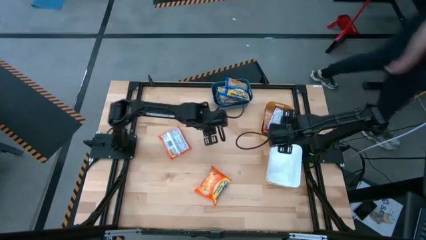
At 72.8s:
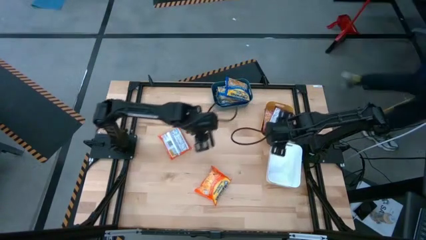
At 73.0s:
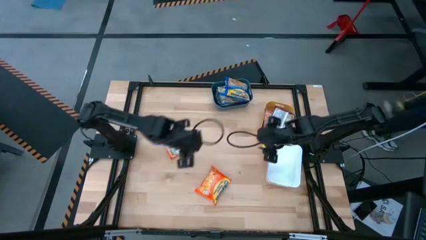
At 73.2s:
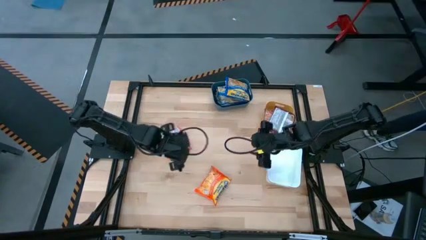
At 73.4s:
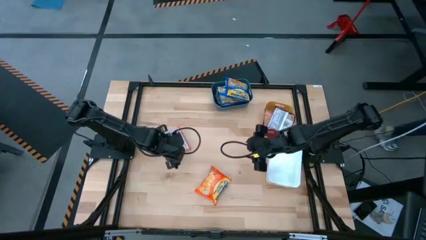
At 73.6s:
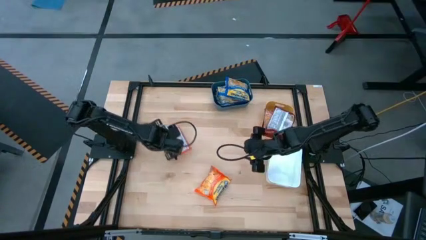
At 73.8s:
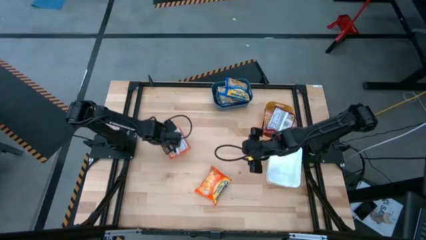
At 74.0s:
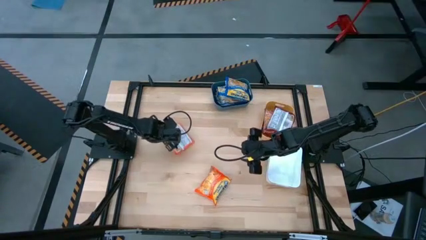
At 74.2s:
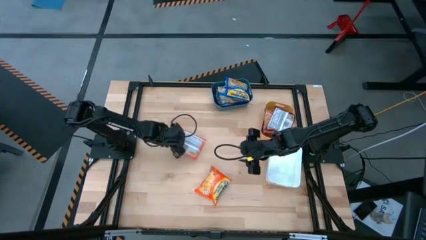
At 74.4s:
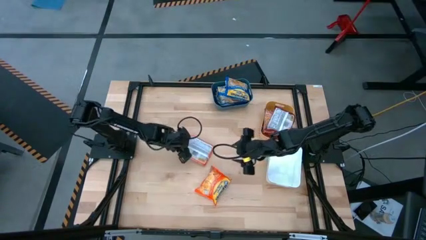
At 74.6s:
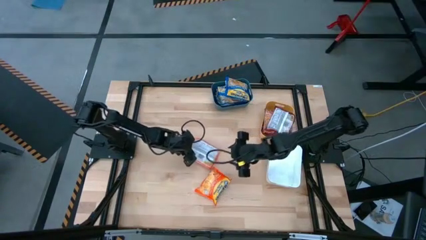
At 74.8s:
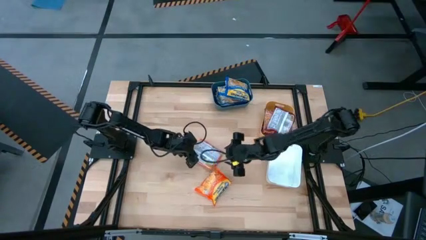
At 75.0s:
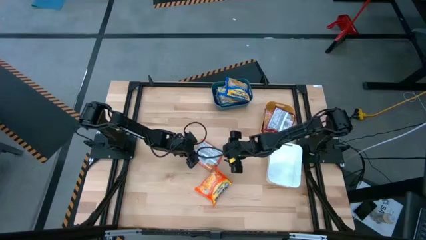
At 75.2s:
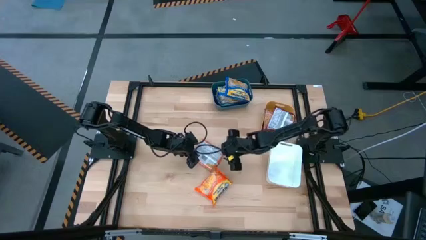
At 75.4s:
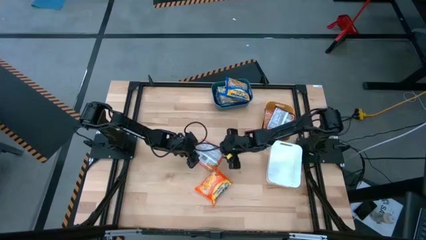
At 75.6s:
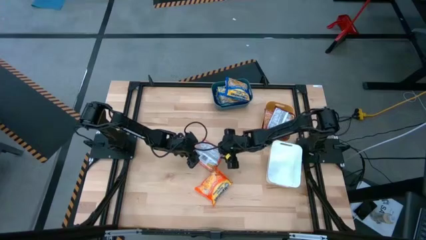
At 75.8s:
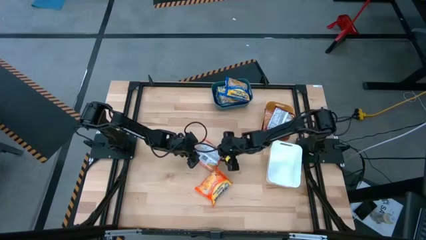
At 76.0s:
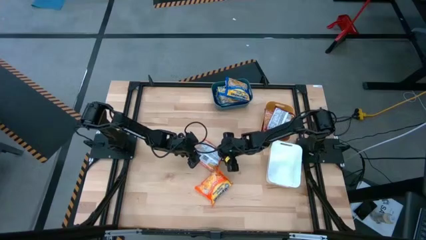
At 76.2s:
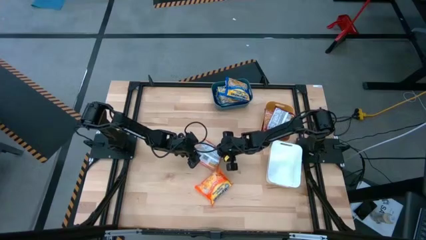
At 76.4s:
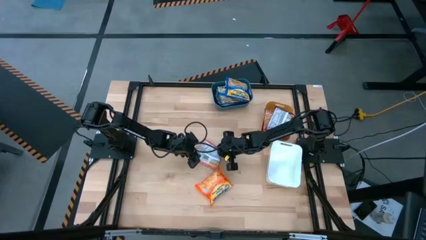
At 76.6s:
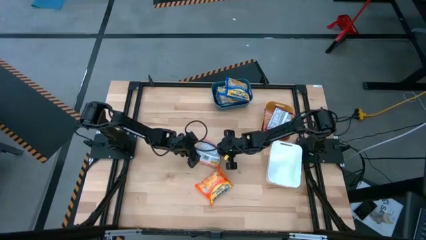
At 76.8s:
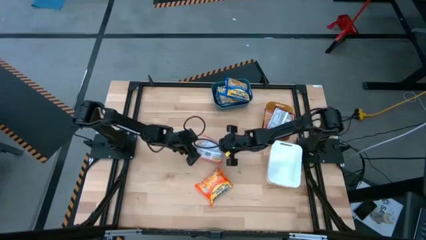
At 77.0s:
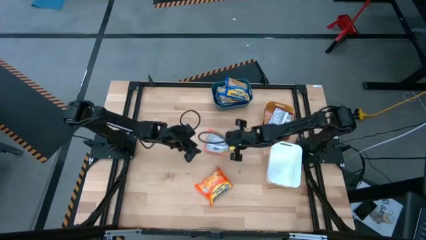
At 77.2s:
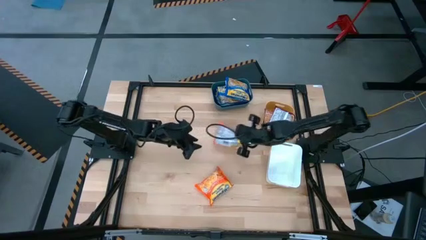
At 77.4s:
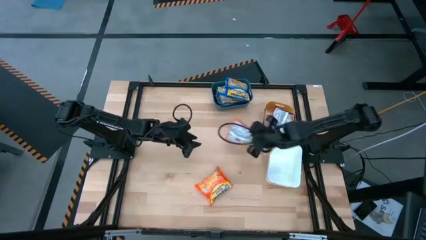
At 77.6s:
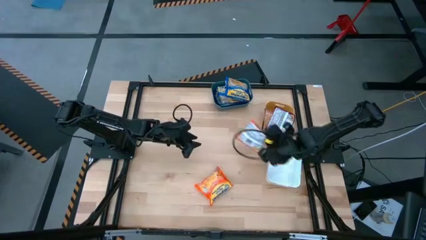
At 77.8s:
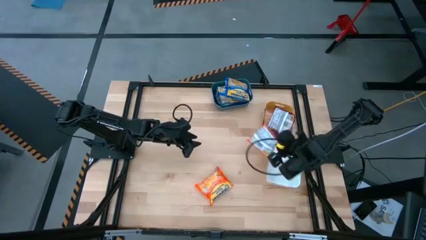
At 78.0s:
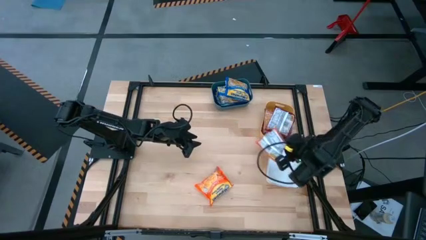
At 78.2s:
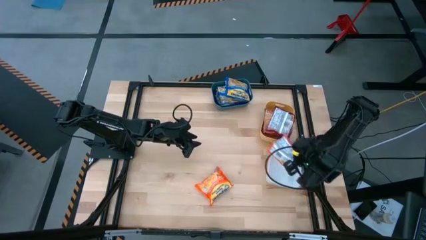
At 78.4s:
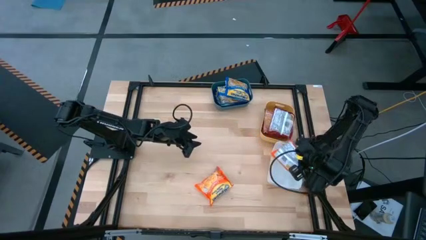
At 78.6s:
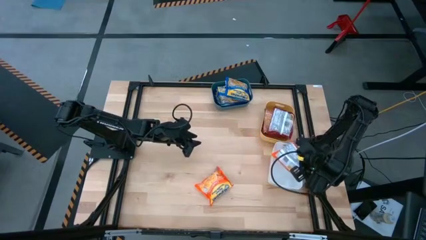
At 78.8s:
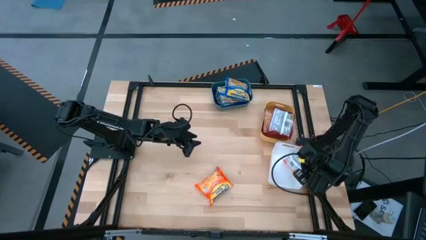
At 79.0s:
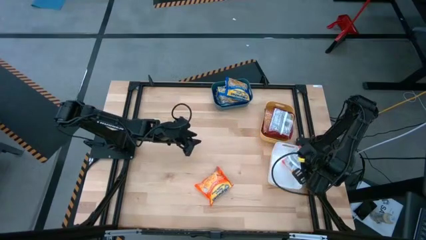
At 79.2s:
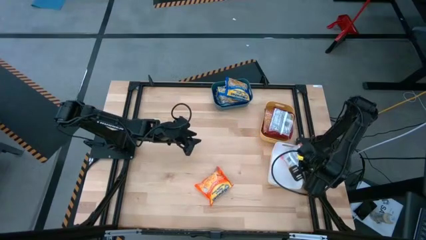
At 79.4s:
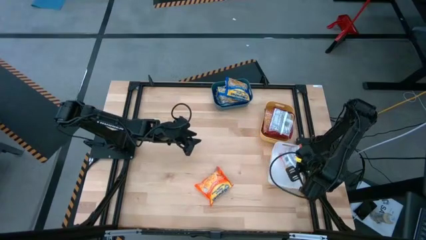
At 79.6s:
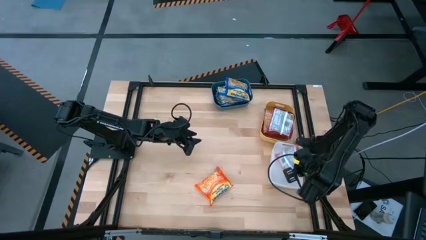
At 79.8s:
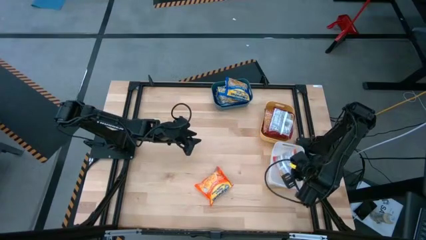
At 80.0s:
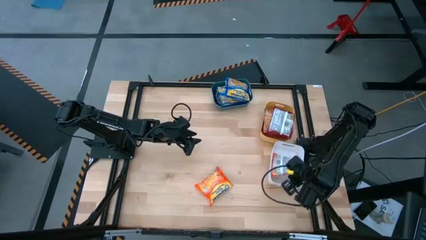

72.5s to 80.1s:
Task: Sort Maruchan noodles
Put the top orange noodle pack into the white bin

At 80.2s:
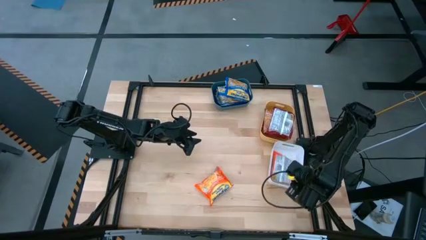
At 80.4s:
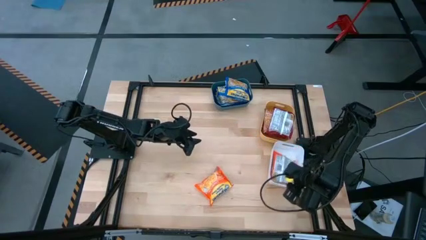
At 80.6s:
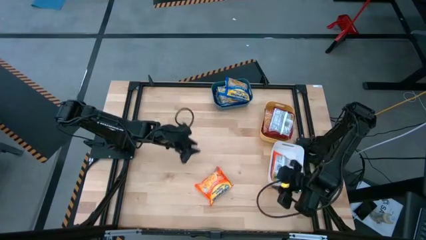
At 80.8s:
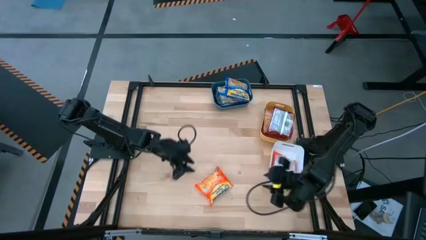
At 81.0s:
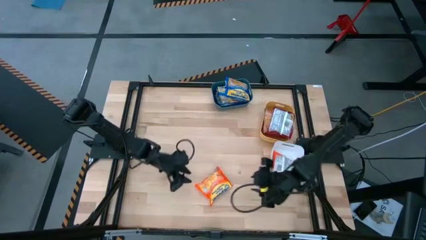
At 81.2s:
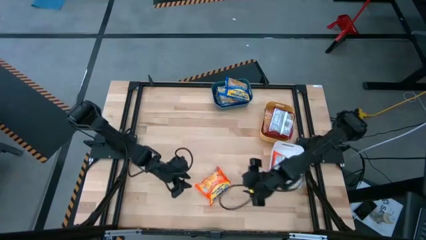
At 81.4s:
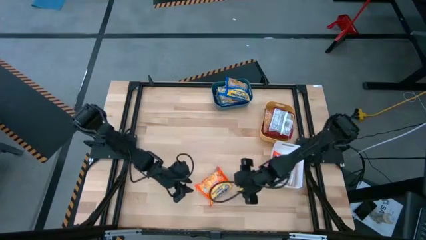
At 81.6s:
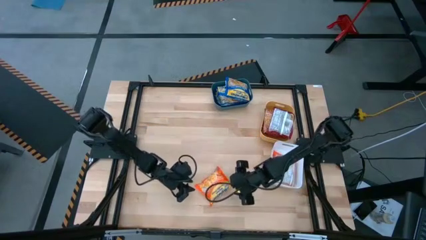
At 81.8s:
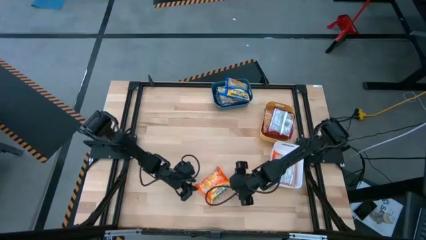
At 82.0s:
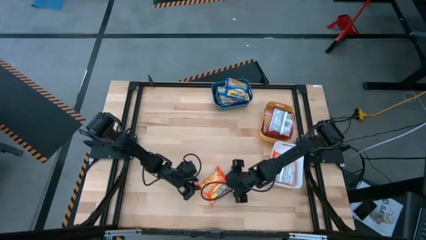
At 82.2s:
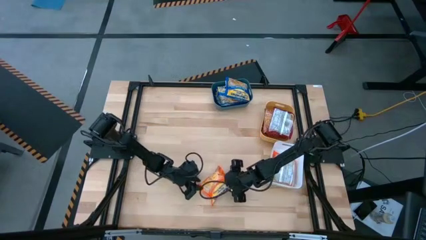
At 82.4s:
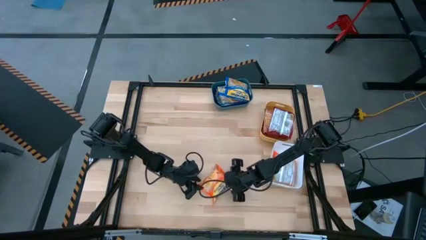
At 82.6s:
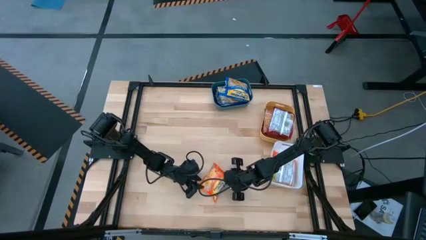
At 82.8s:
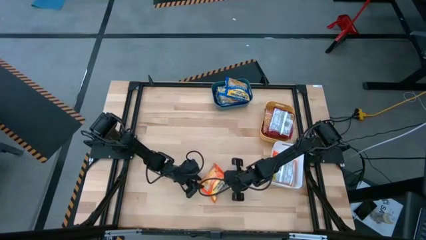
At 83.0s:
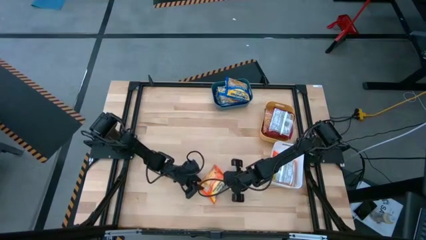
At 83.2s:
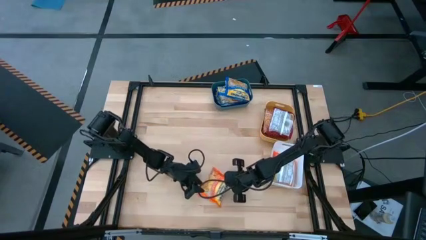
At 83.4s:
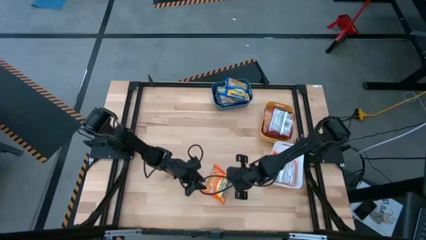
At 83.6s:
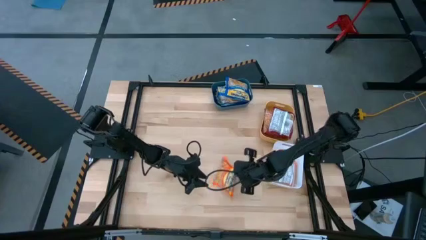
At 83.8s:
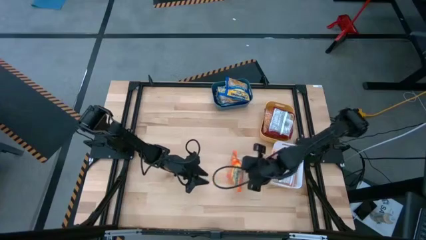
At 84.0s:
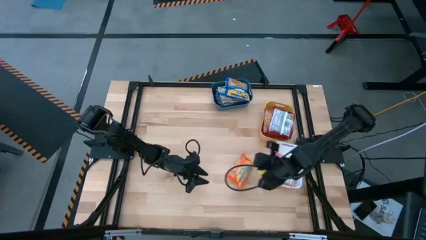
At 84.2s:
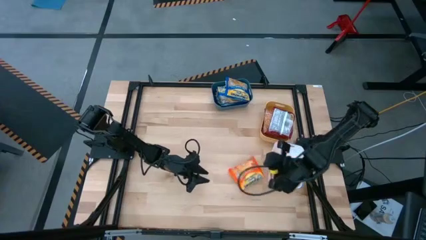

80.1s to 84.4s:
Put the orange noodle pack into the white bin

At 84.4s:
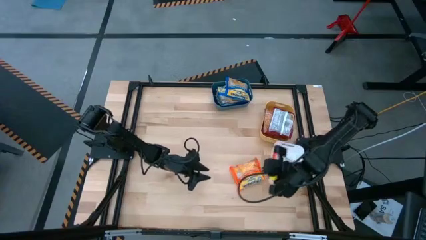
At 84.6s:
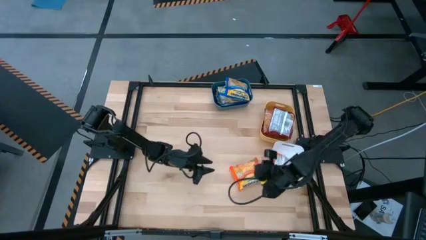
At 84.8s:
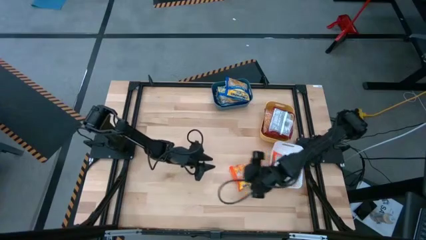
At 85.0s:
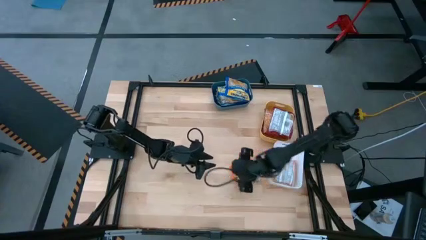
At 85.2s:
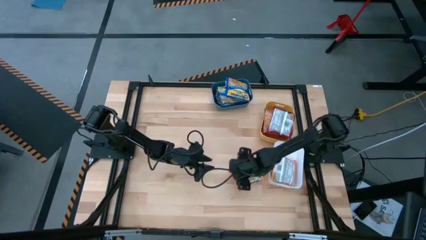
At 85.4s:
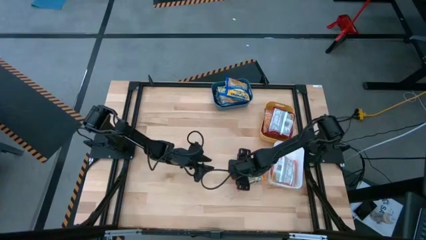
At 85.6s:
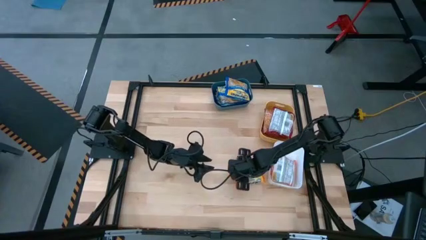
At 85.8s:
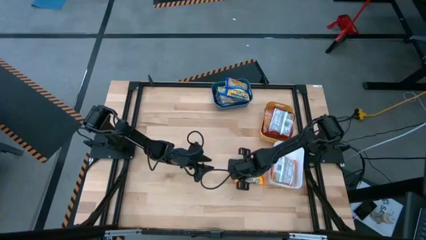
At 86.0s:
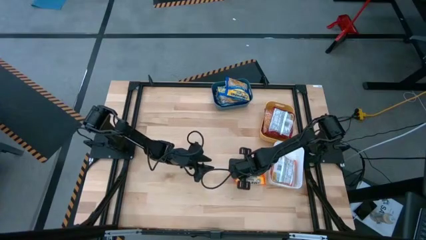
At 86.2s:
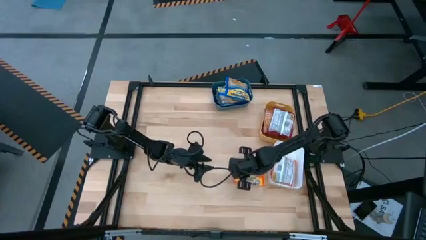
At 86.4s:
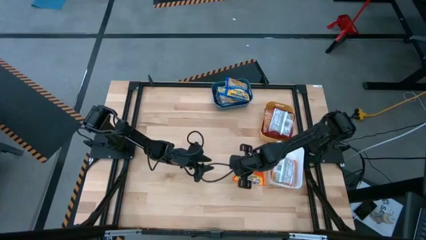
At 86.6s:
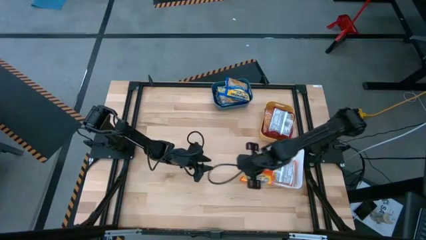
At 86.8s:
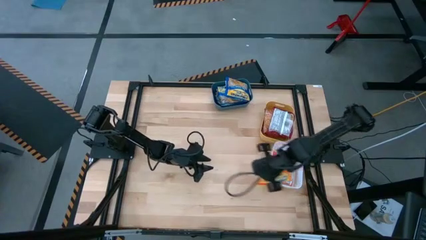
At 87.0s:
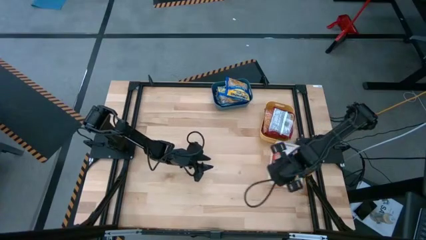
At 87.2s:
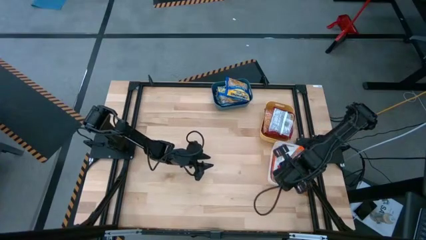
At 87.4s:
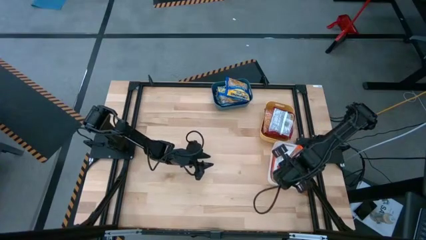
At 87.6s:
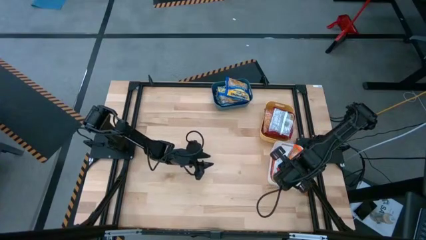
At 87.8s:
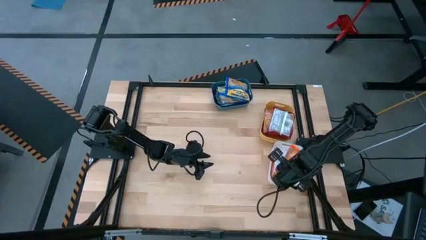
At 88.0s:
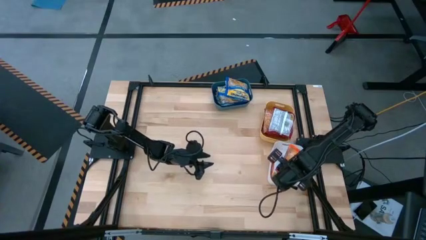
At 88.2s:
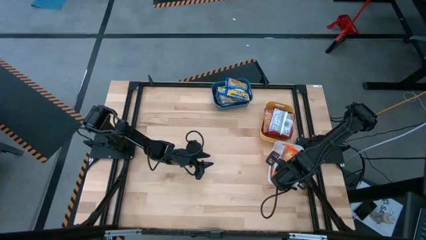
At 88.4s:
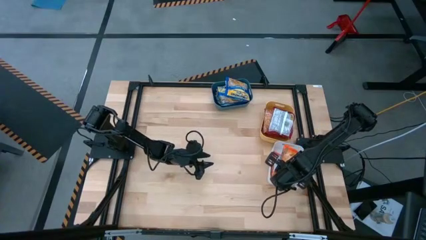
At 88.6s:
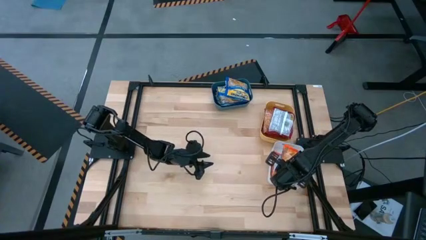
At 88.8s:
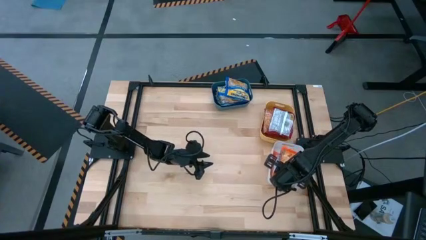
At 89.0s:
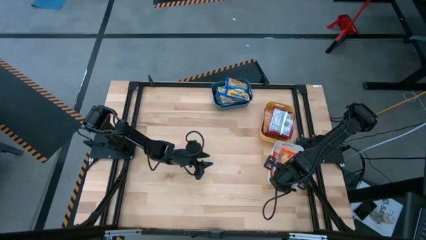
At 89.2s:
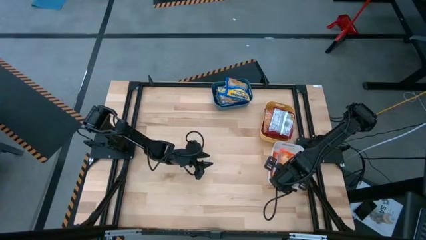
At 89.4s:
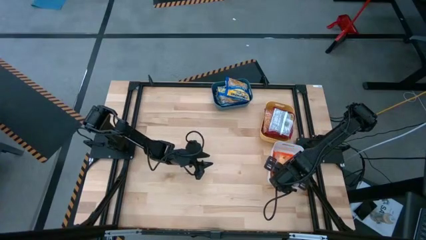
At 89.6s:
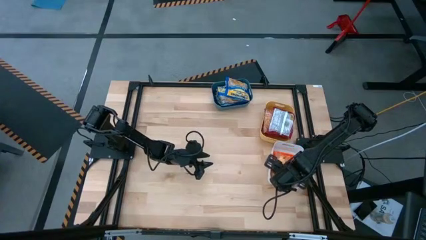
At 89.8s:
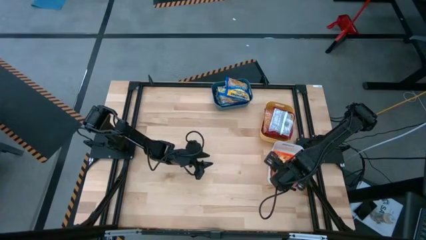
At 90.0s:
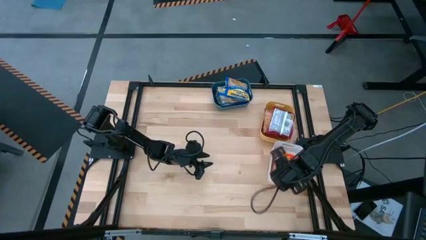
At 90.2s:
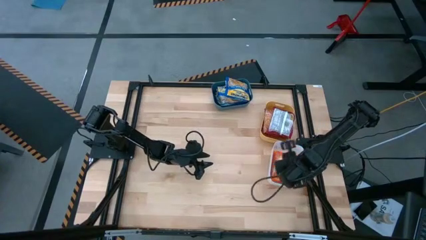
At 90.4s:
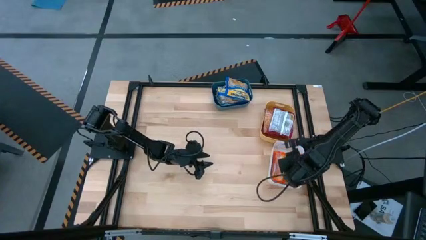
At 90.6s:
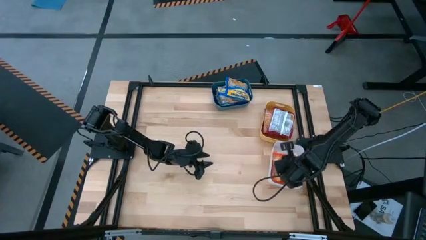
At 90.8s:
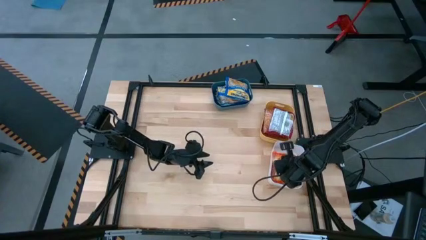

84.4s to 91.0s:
Put the orange noodle pack into the white bin
